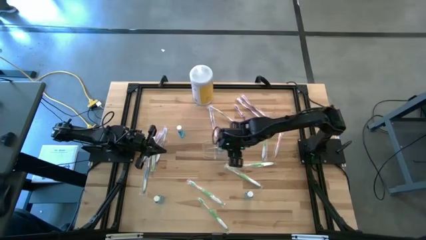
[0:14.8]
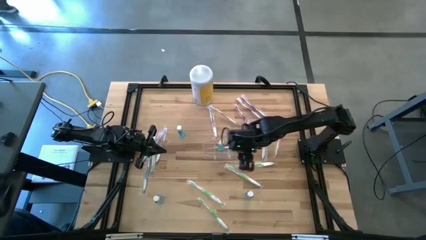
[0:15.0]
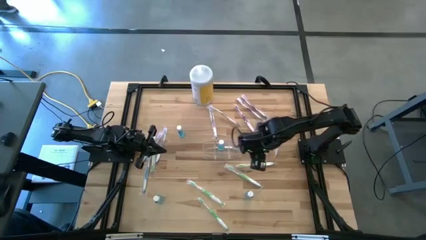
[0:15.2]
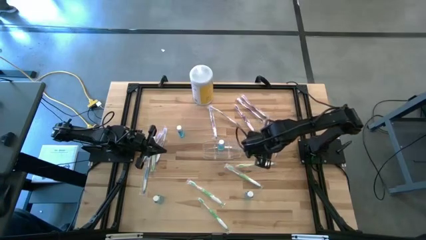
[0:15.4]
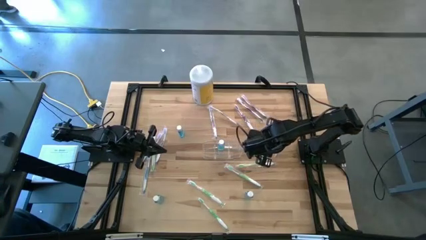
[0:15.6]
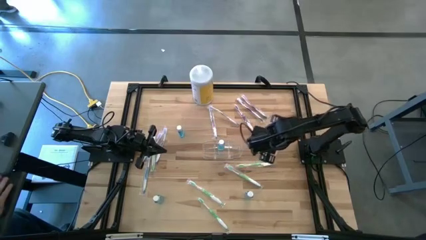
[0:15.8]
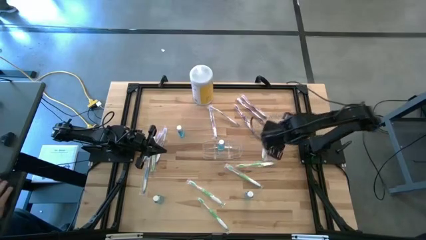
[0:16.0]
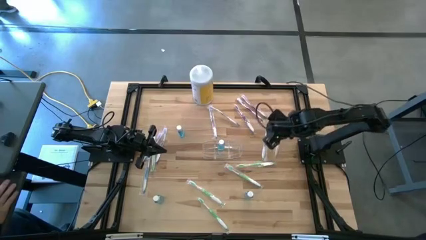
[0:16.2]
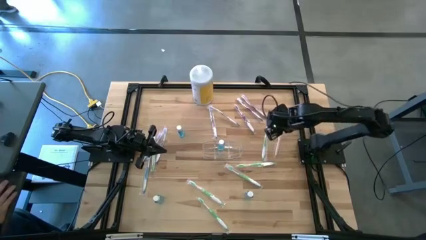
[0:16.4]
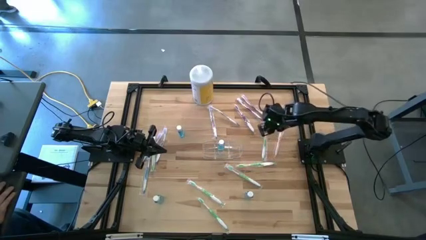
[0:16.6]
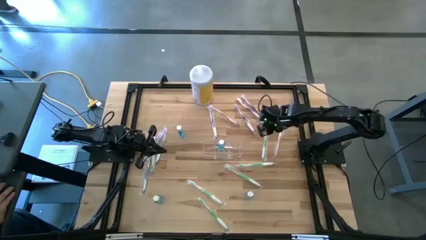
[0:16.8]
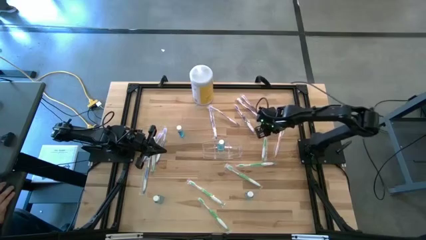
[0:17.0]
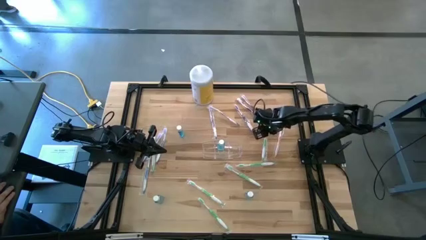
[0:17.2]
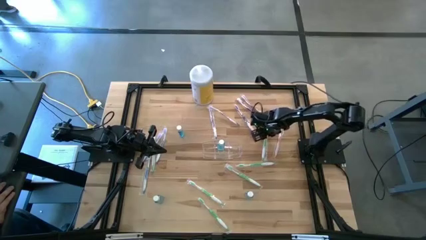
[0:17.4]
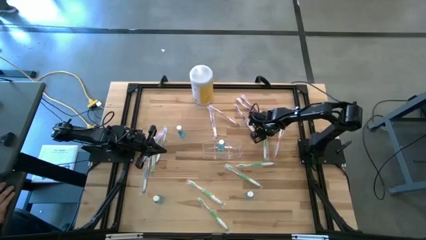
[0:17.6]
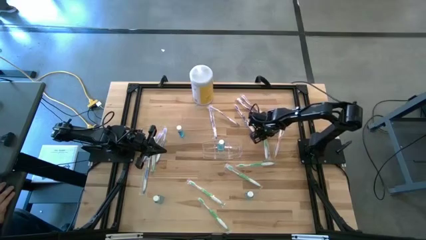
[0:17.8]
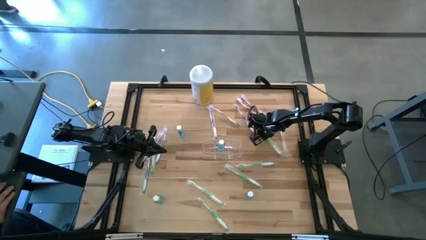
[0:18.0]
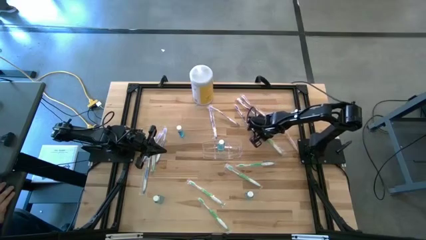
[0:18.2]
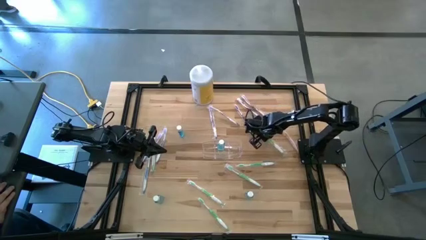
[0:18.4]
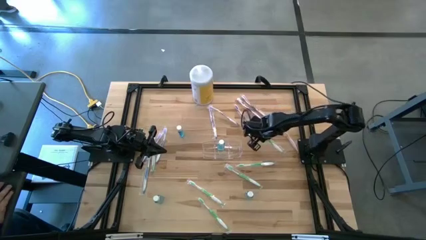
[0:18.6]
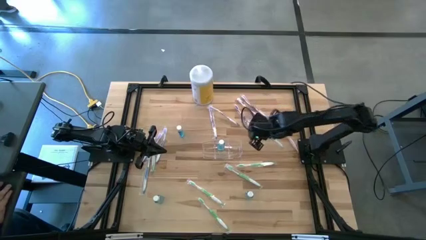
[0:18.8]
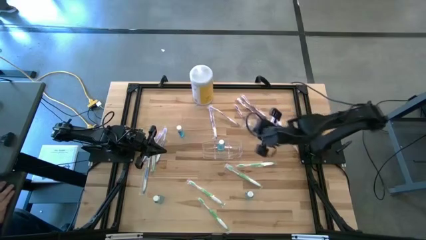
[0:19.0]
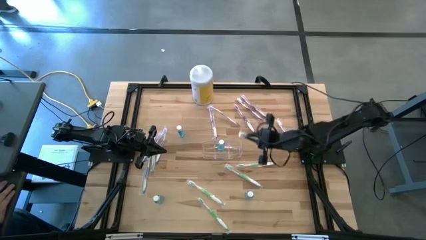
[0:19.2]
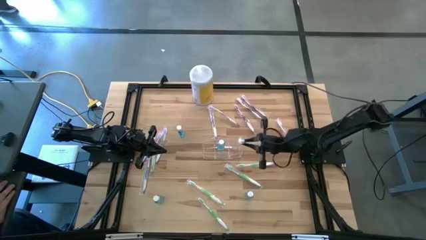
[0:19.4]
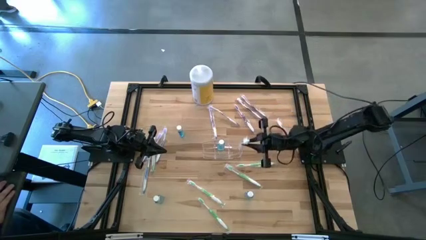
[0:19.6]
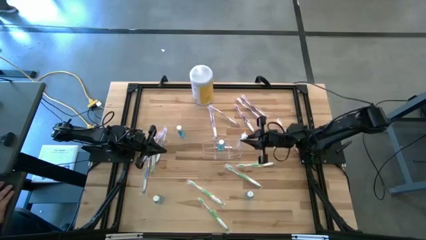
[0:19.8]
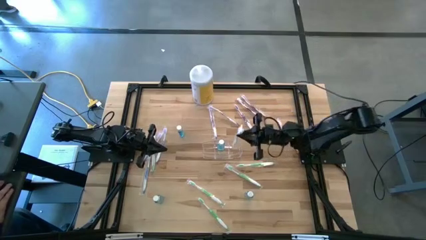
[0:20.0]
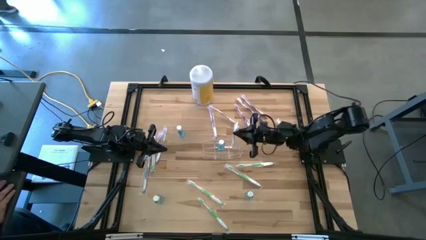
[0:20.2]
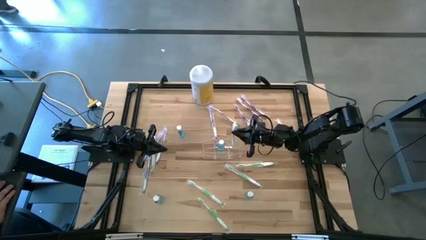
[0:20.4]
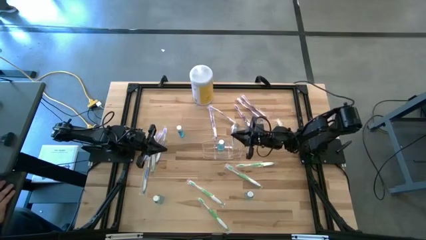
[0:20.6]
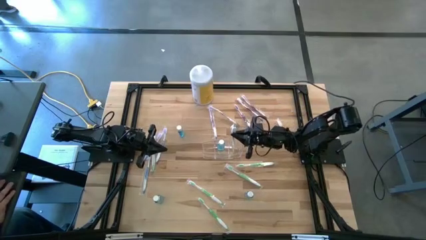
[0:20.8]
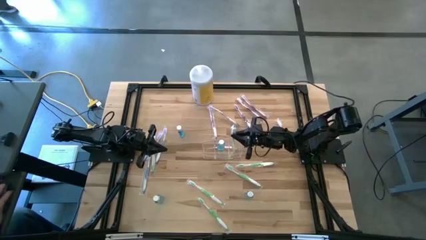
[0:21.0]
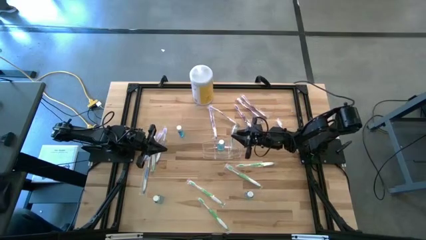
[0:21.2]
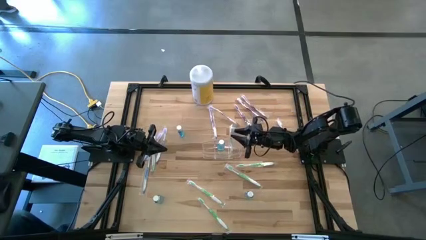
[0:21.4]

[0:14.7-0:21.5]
Task: Pick & Place toothbrushing station
Put the green toothbrush into the transparent organizer

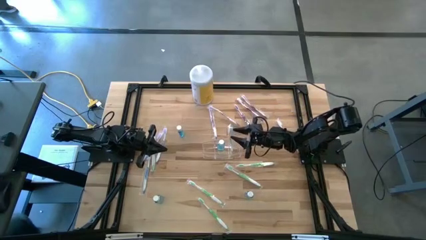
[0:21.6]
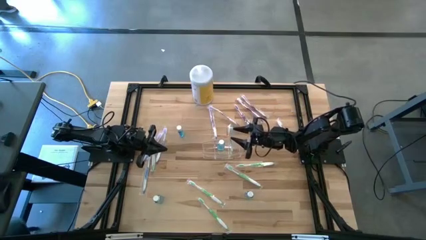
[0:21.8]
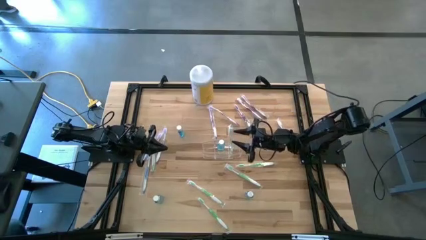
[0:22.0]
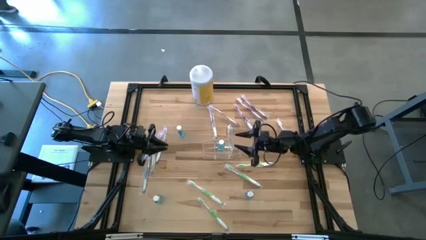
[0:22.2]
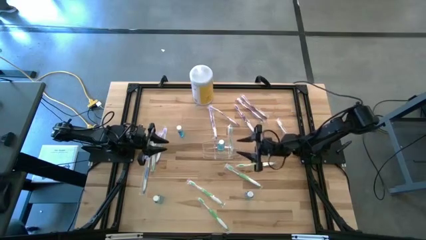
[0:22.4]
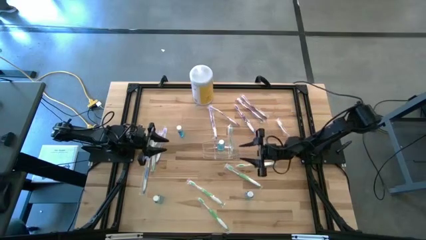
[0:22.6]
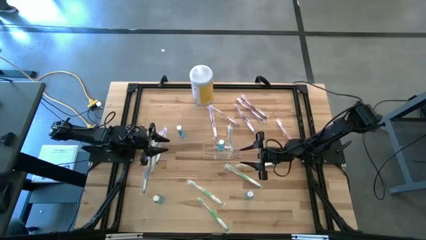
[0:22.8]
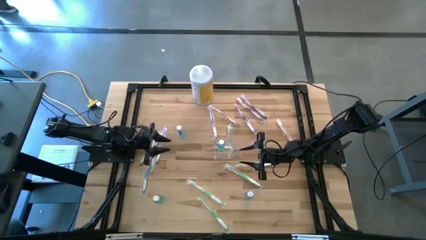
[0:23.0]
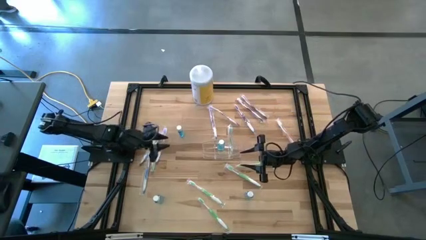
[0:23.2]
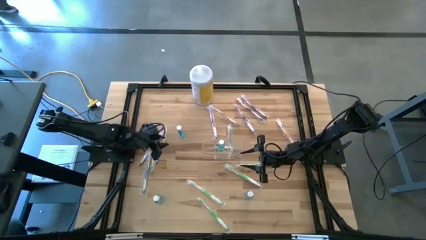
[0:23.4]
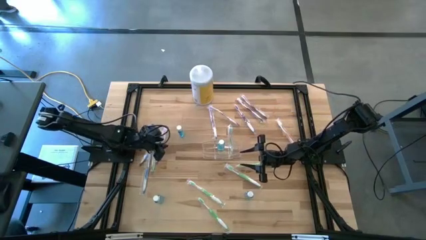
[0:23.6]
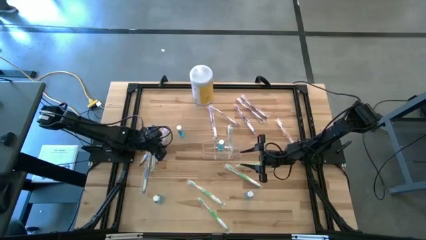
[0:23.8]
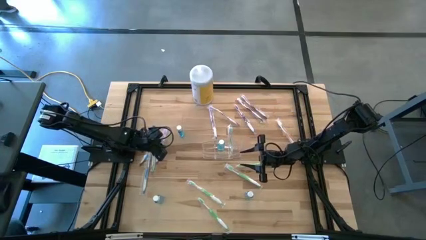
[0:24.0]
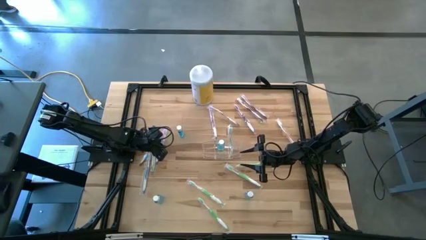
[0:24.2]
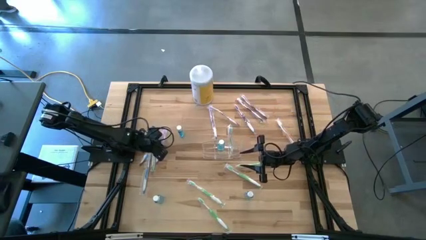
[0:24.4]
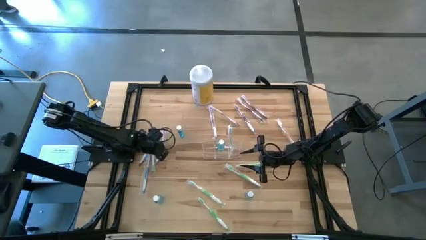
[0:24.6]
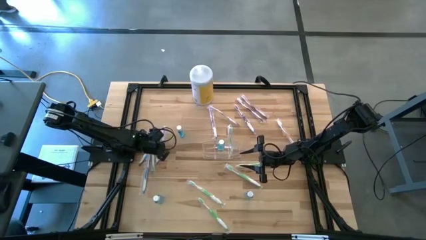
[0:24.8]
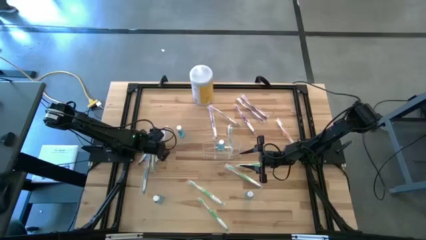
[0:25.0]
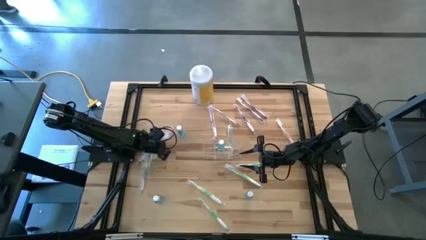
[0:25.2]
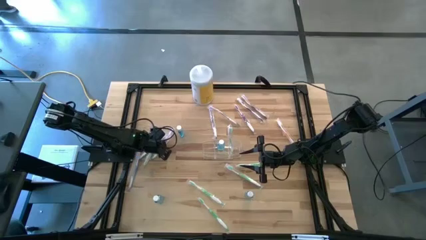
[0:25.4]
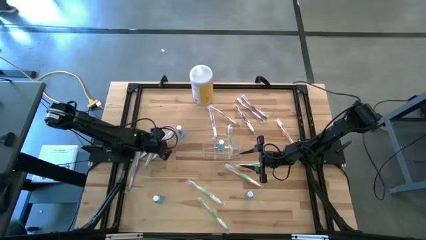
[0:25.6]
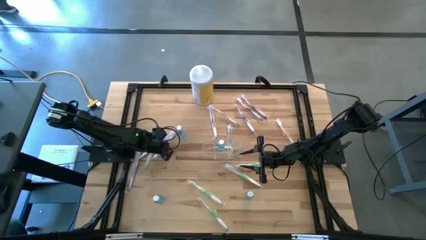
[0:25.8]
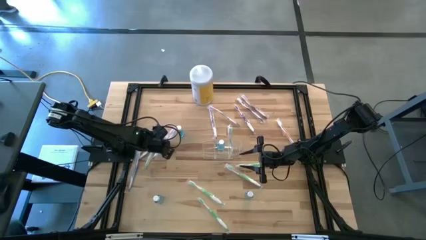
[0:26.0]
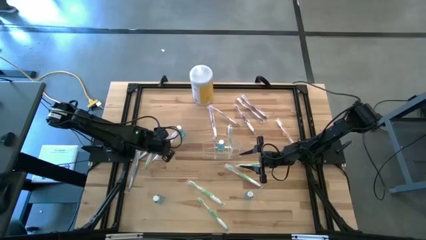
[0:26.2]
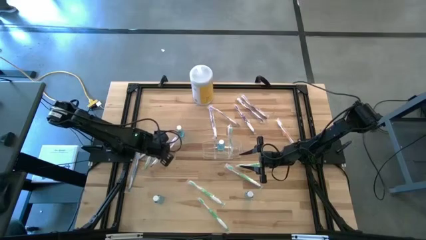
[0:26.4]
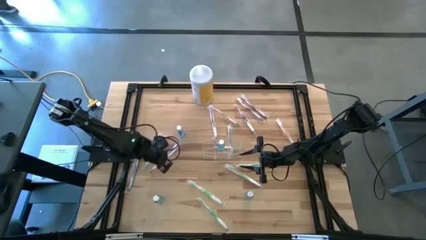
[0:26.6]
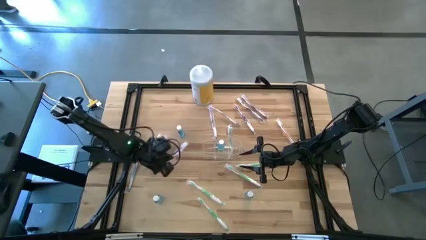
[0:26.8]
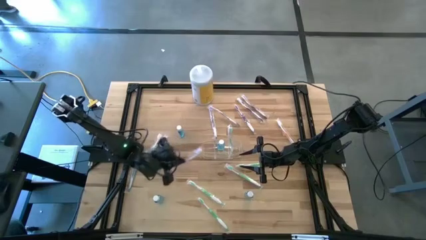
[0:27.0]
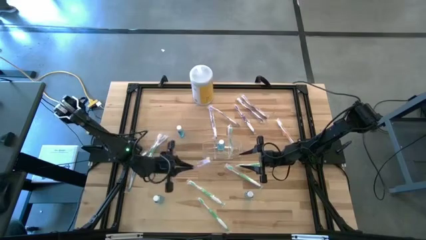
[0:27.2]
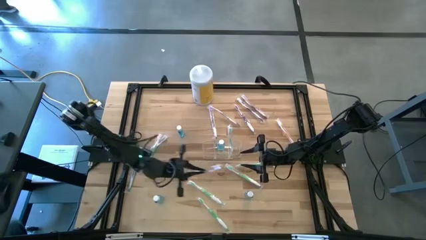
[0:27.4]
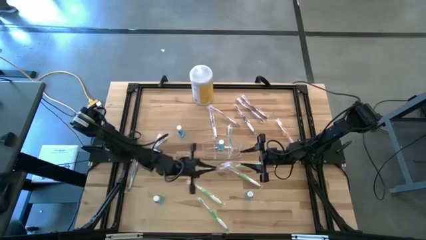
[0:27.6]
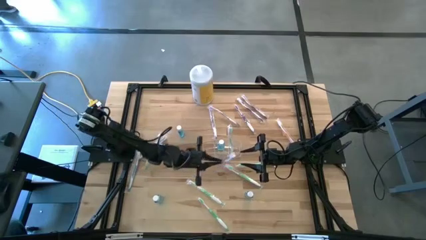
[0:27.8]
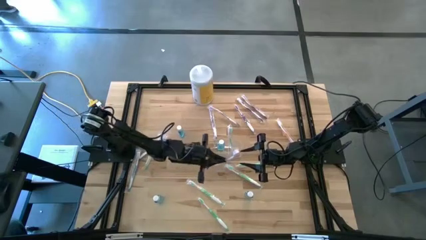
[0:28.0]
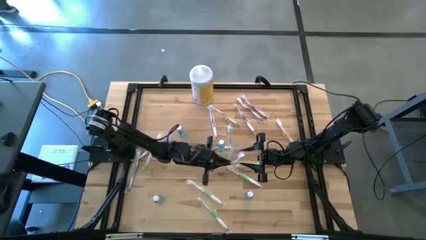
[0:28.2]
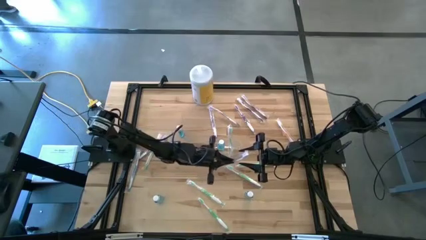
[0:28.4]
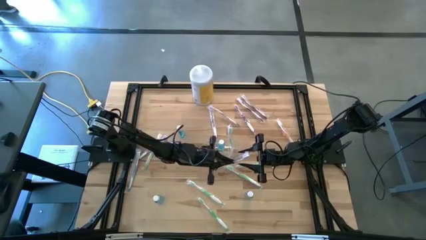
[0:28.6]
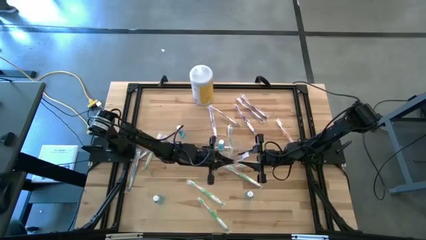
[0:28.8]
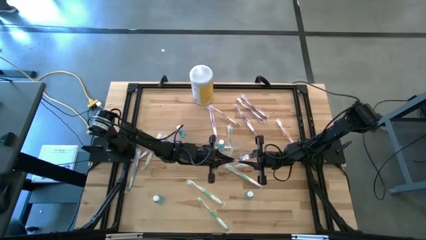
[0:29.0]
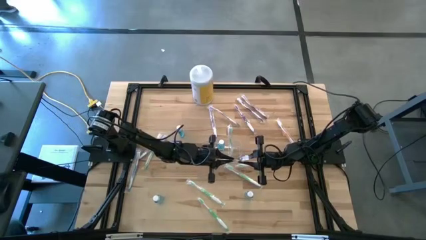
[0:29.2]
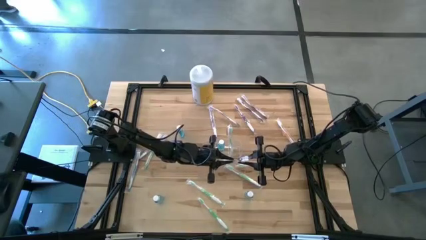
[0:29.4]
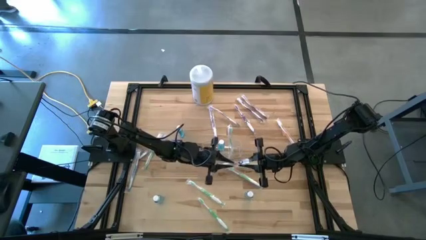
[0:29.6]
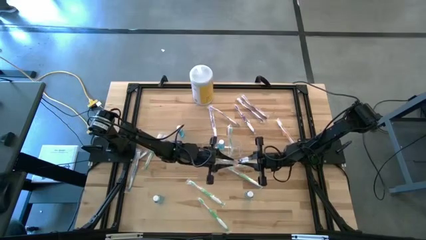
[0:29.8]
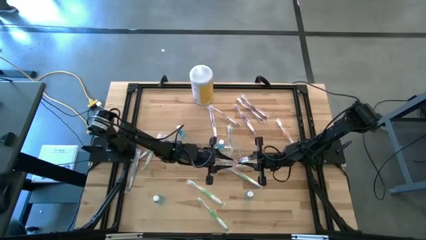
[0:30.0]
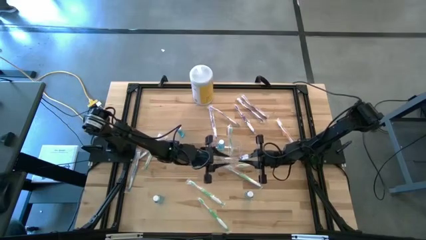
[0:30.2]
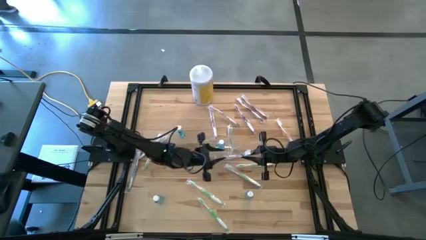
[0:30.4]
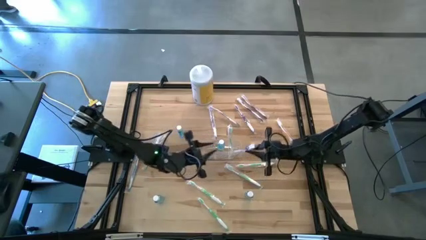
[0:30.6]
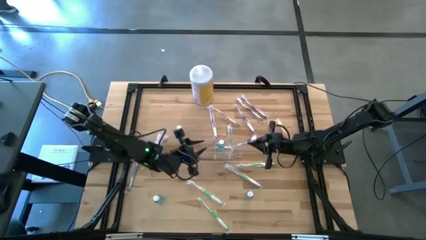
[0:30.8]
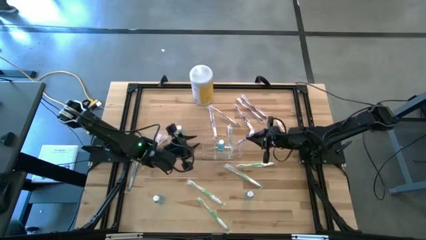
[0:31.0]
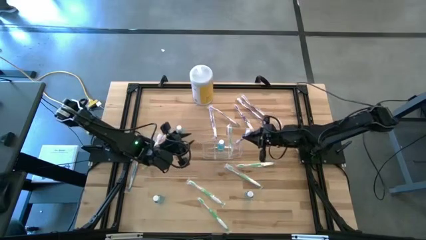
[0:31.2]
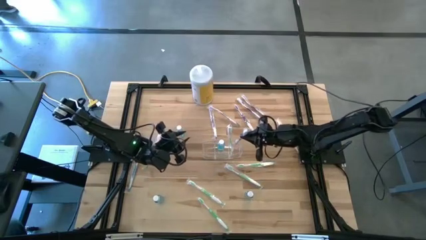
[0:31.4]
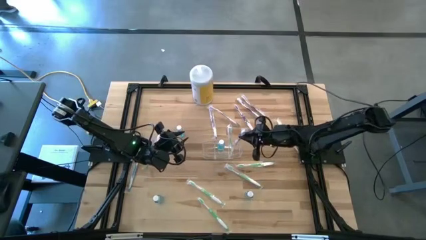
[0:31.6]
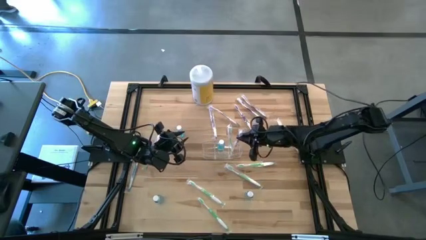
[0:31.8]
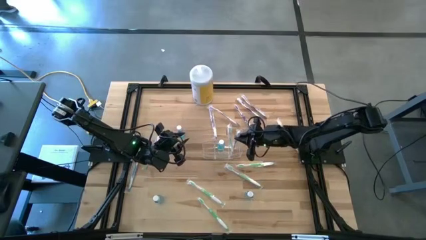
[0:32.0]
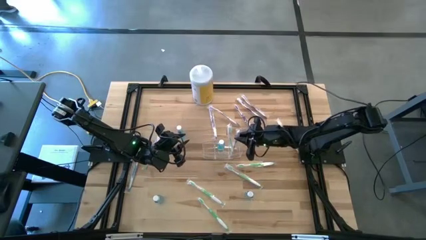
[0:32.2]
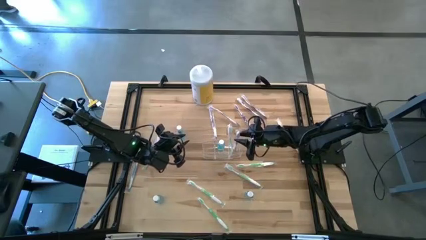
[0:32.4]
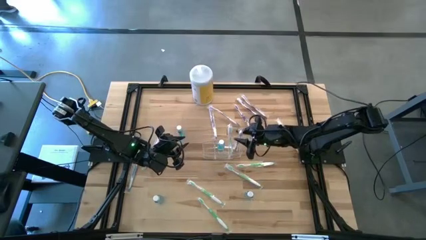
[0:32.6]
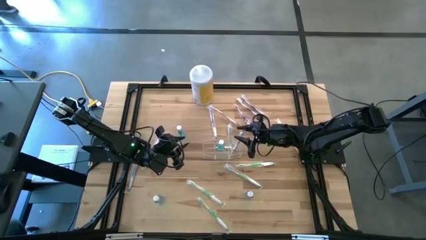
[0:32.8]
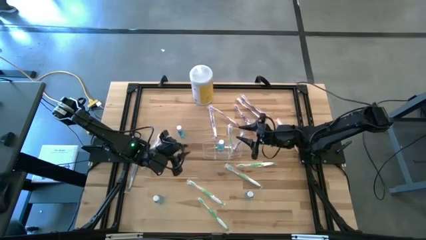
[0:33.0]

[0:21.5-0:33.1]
Put the purple toothbrush into the transparent organizer
